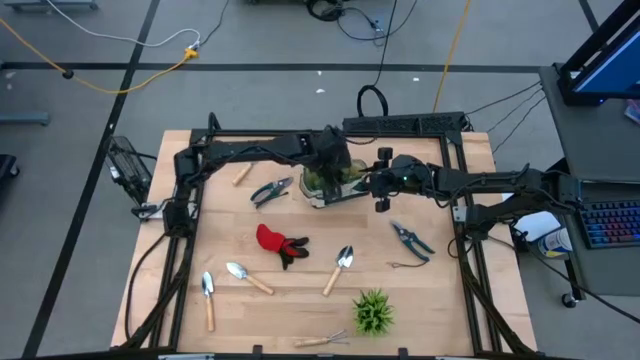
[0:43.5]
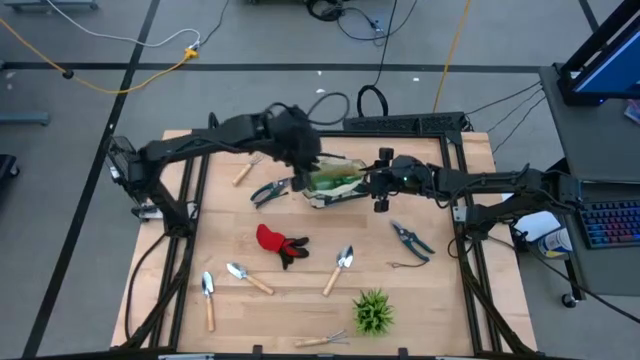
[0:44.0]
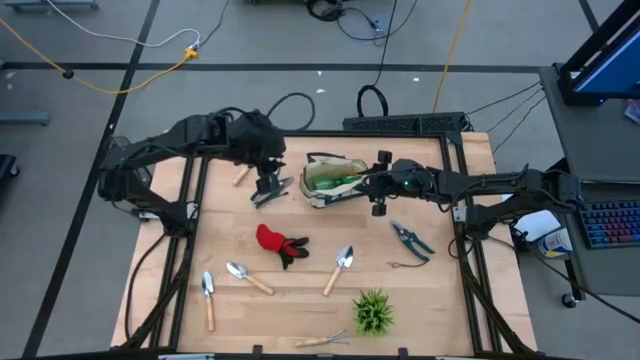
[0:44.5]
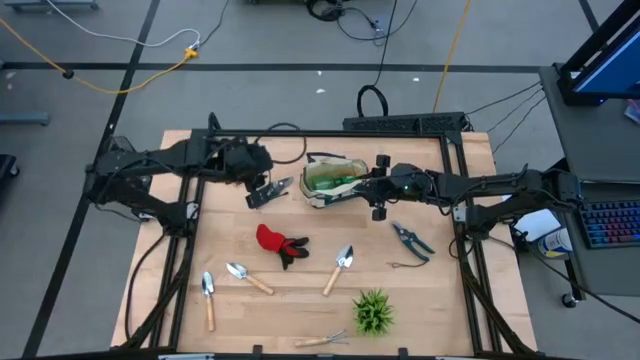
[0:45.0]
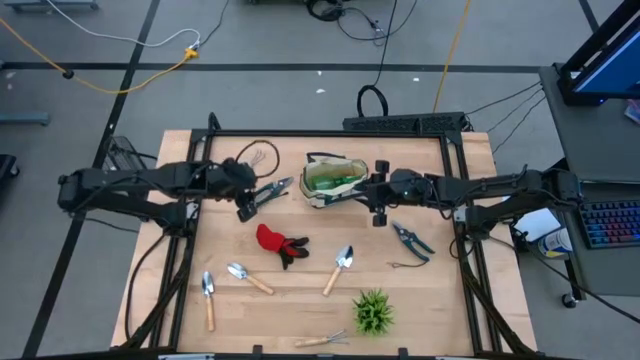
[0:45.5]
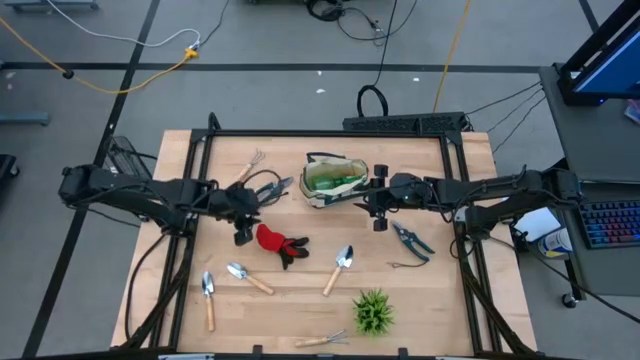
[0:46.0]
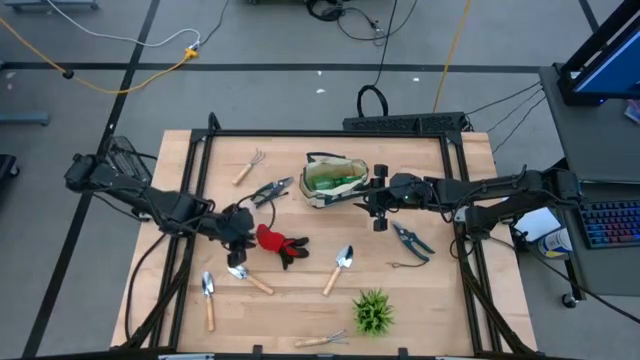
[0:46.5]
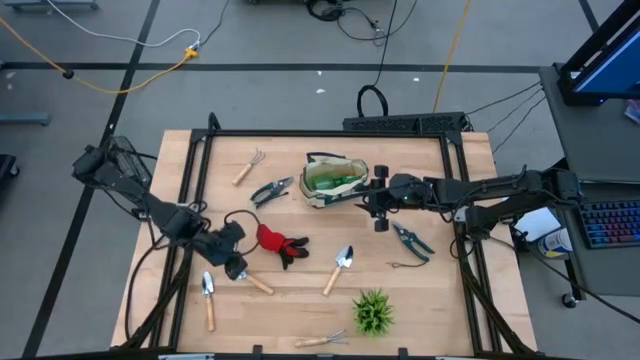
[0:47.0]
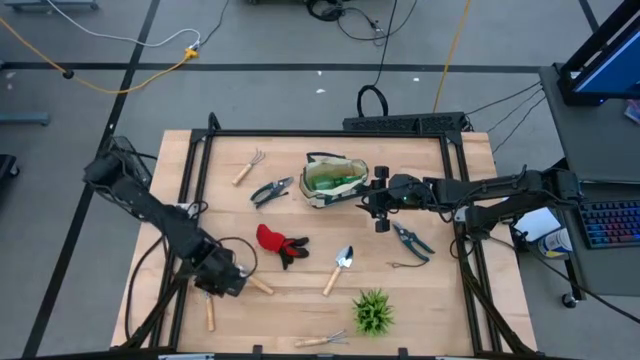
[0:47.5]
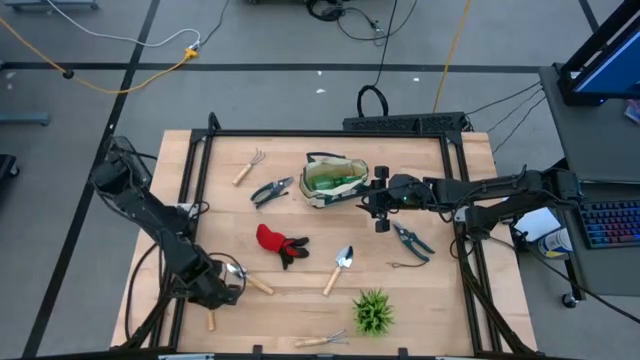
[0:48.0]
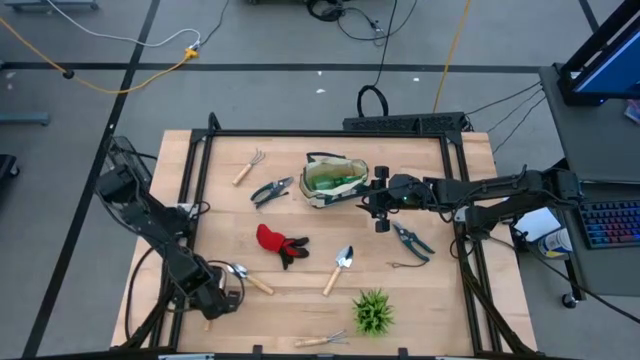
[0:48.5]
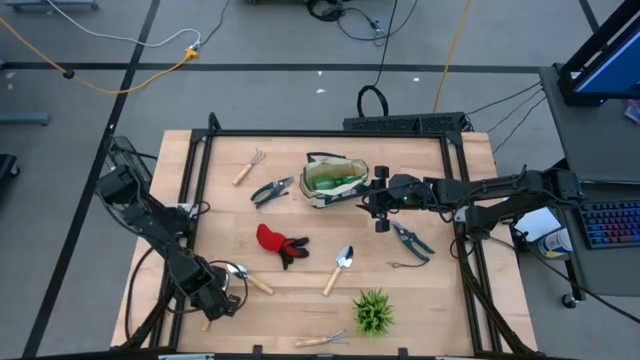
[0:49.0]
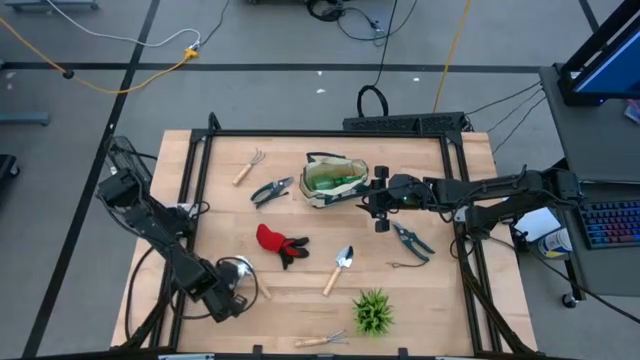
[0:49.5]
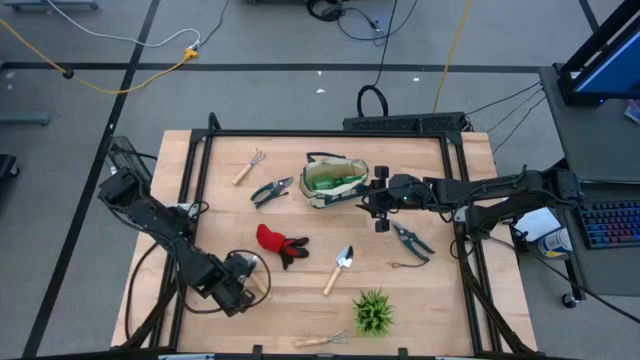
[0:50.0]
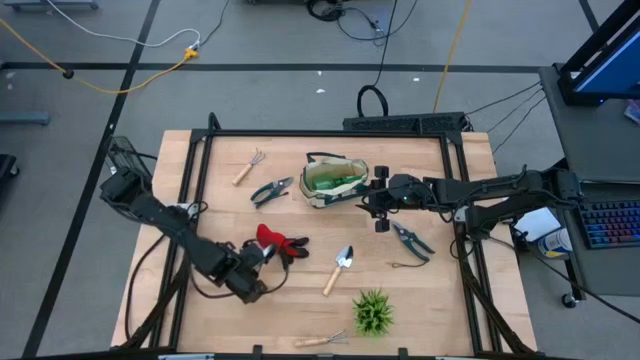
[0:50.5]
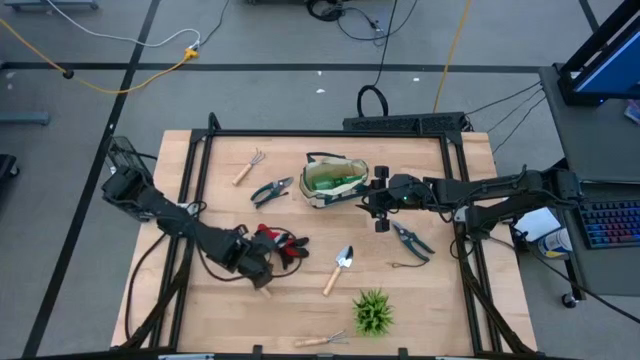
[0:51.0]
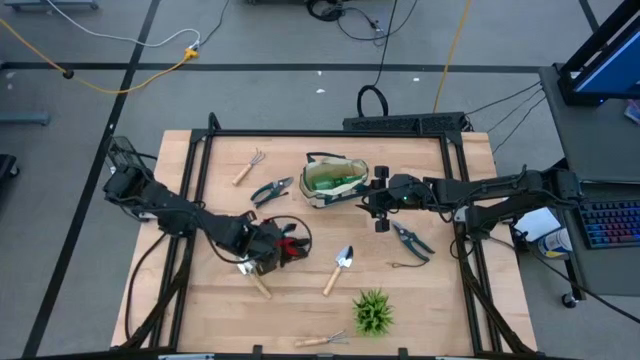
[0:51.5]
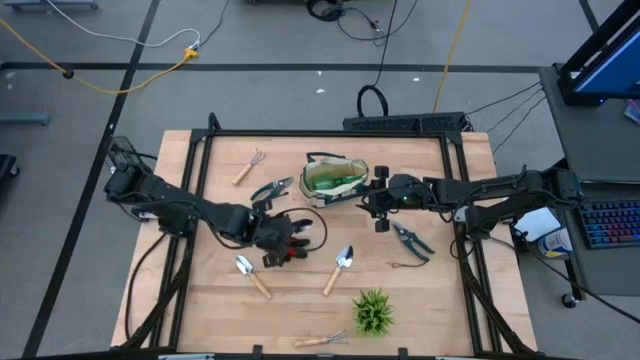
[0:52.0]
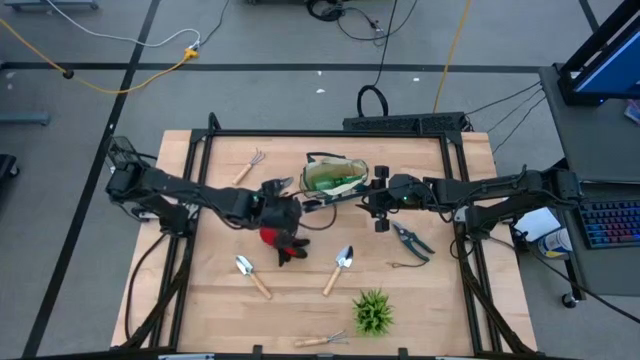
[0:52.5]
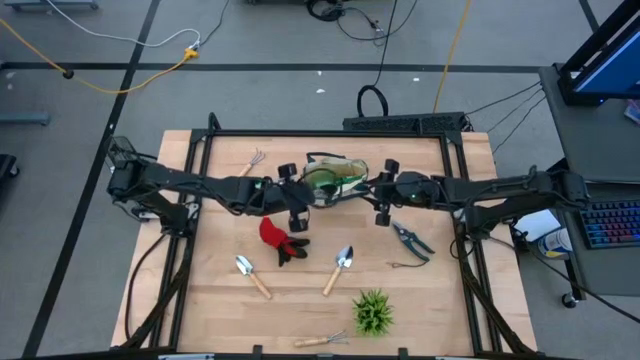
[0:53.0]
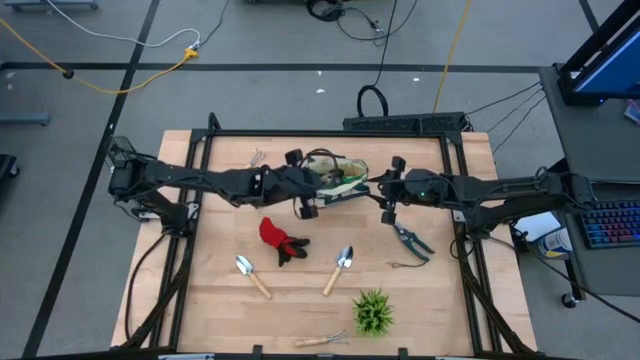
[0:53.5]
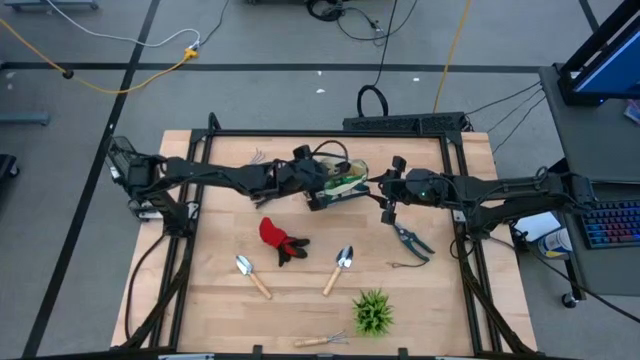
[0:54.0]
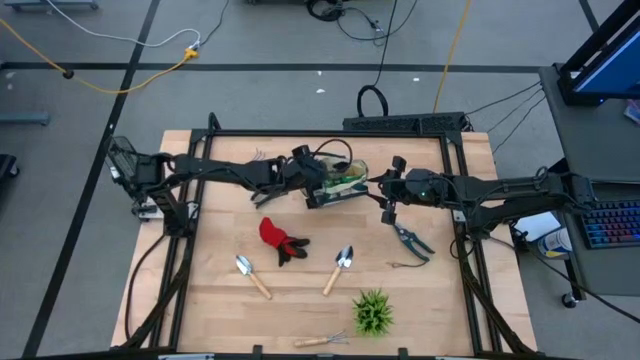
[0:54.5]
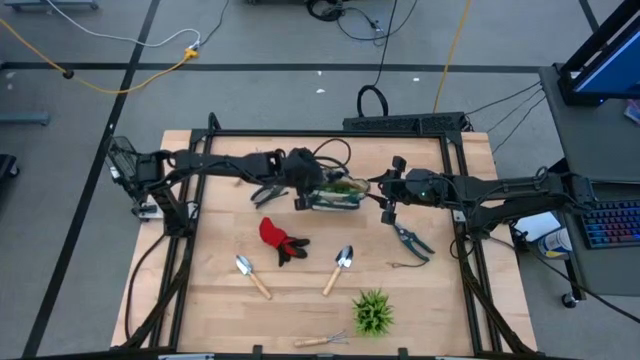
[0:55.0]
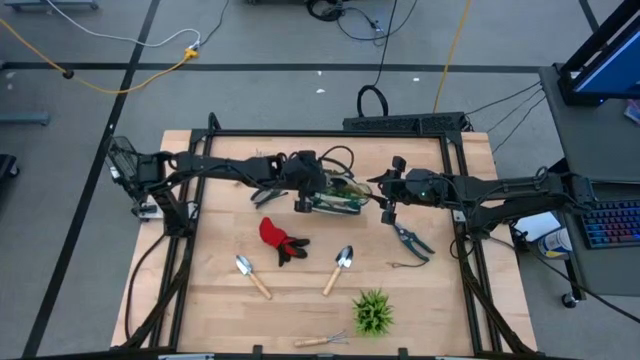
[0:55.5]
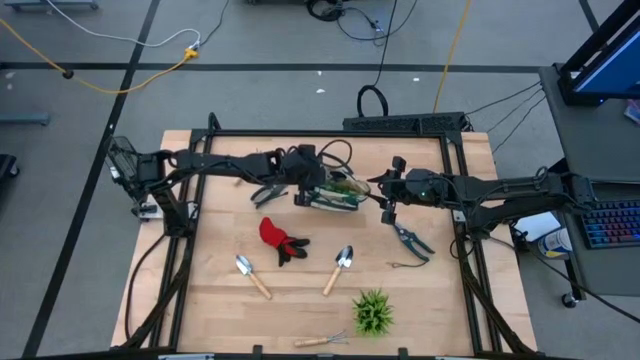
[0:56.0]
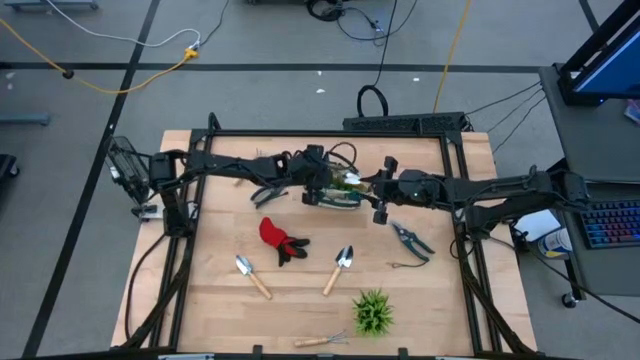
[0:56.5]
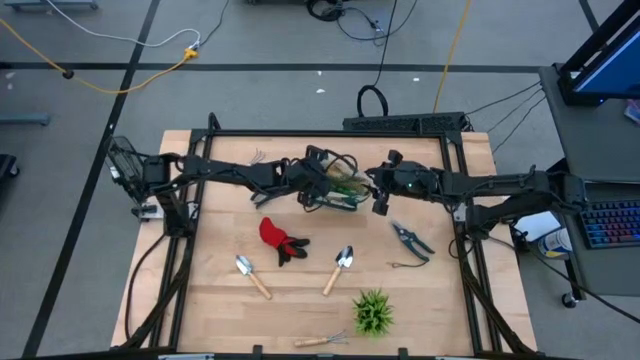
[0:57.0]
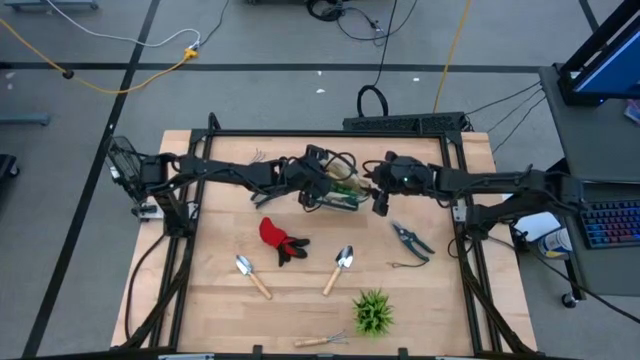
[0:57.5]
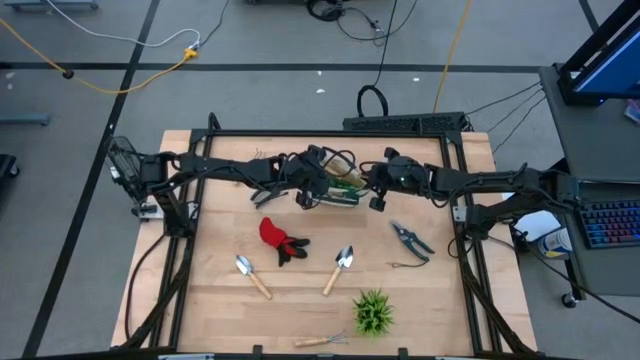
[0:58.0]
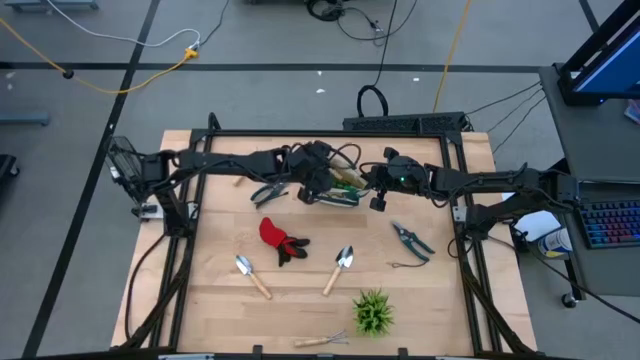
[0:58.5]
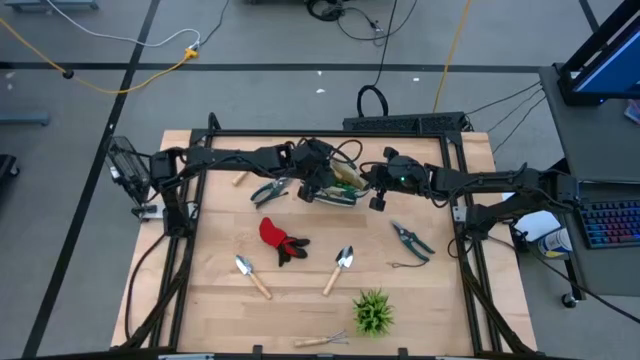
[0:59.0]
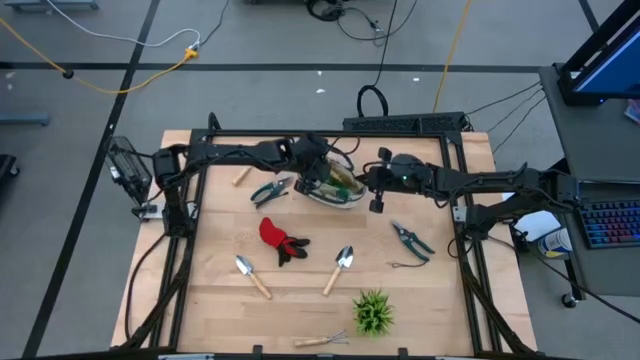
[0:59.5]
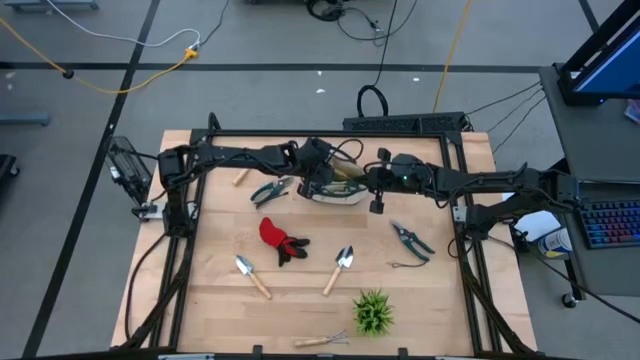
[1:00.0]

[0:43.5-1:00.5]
Task: Pick & Place Garden tools in Gardening bag
Put the bottom left brown trowel into the gardening bag

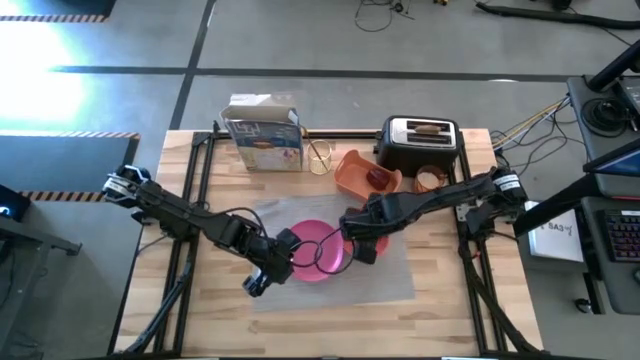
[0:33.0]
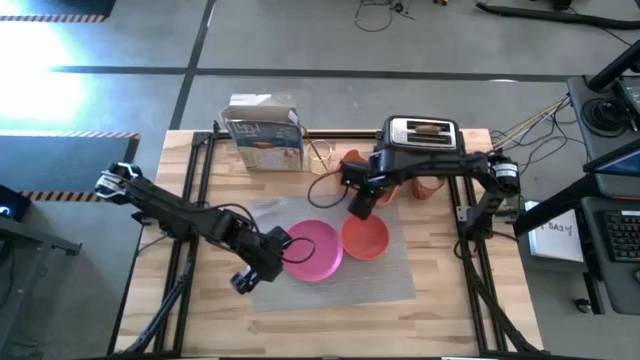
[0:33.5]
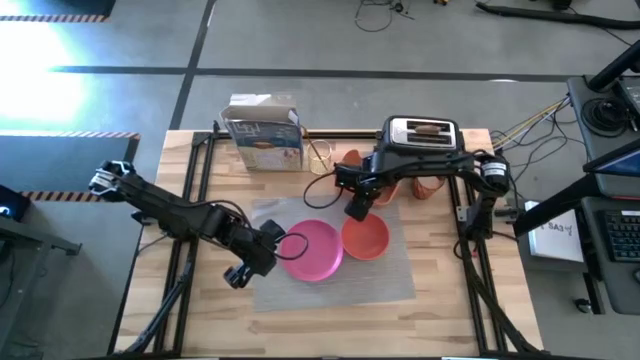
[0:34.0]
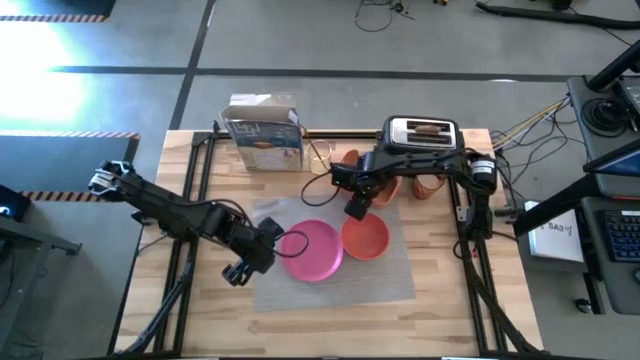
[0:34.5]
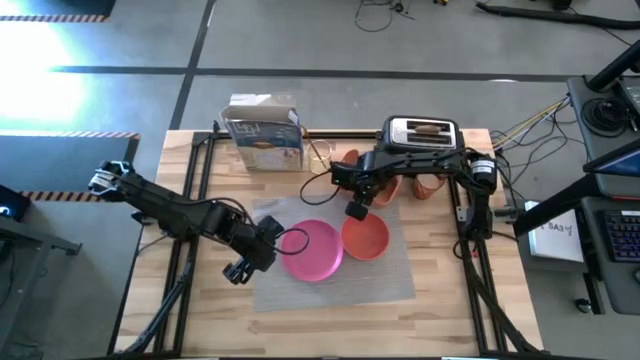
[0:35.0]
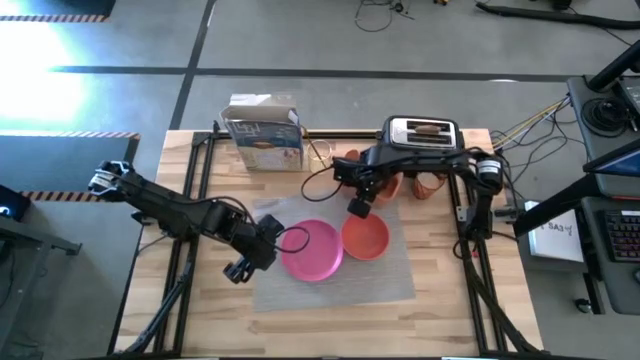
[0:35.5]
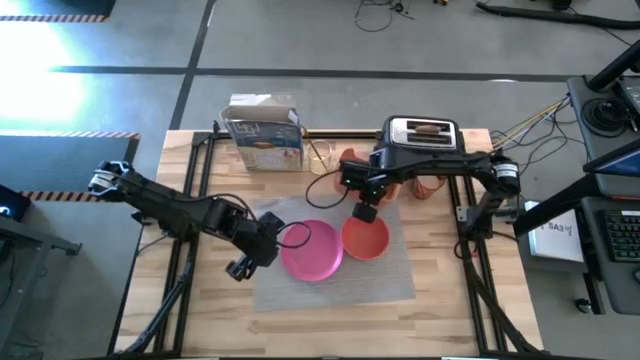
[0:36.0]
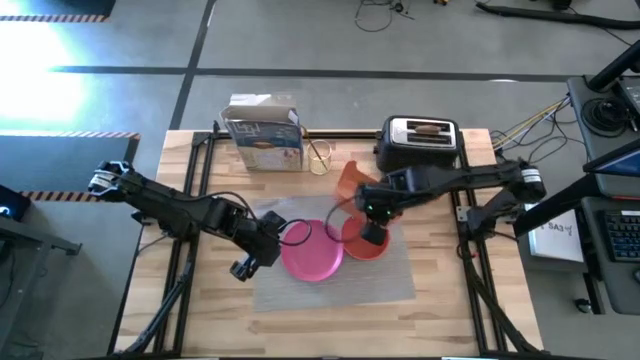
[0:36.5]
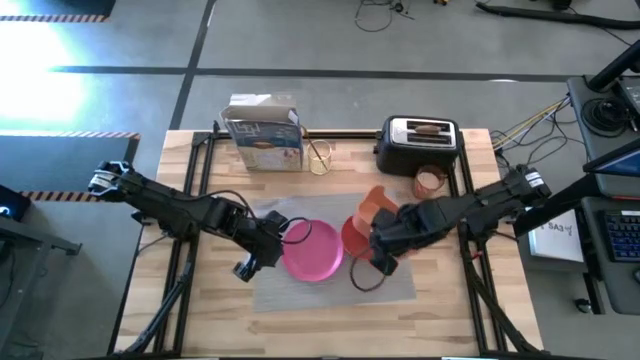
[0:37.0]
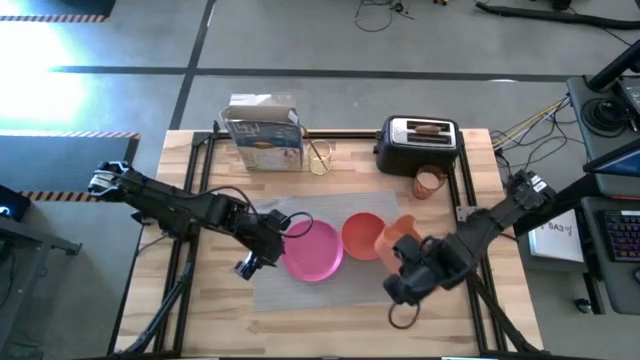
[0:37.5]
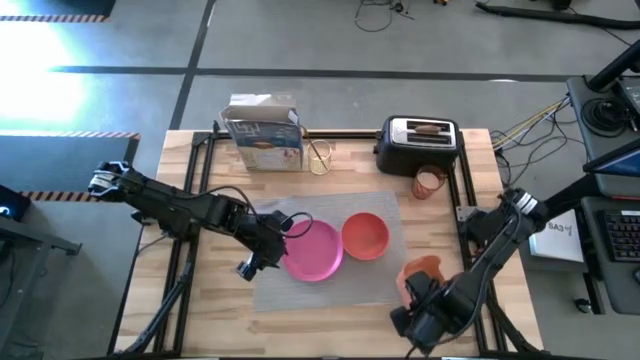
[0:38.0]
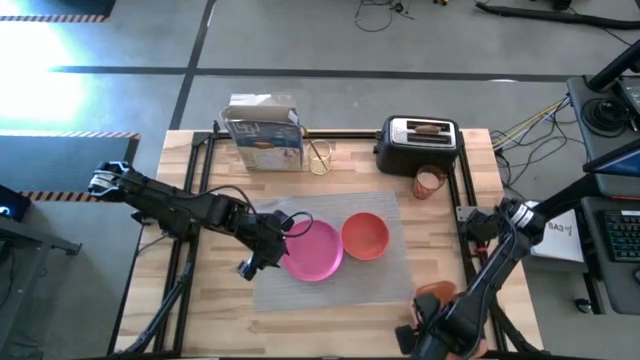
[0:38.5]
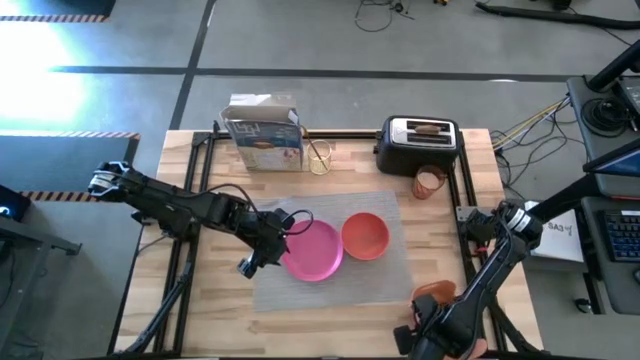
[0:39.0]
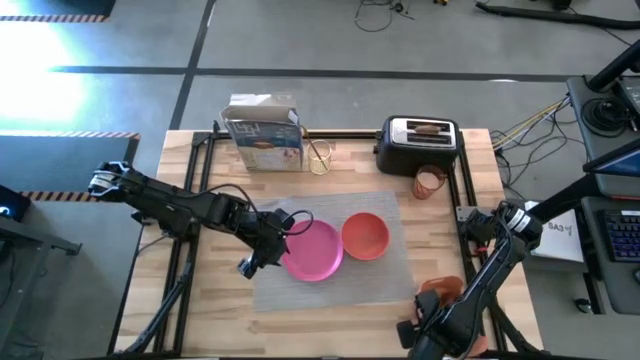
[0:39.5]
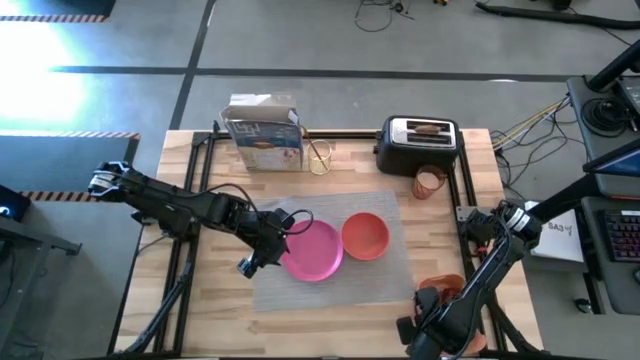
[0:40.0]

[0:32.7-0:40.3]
Task: Arrange a breakfast setting
Move the orange bin to the bottom right of the table
